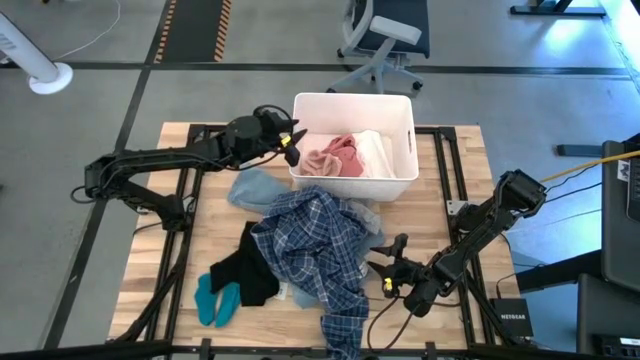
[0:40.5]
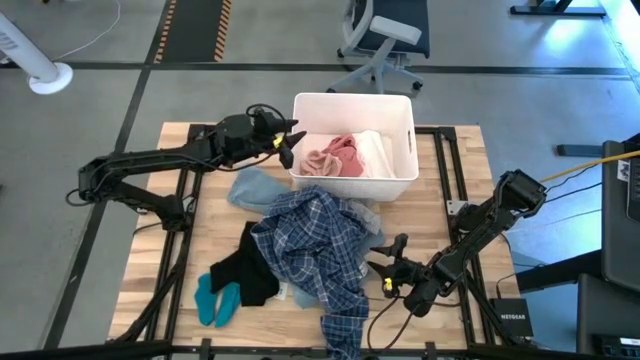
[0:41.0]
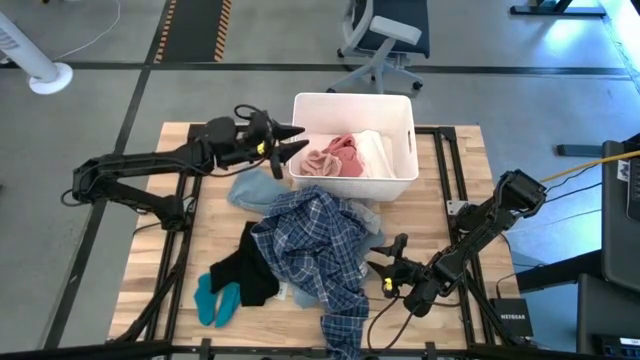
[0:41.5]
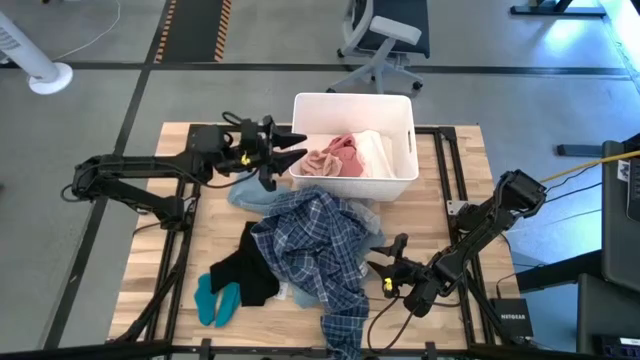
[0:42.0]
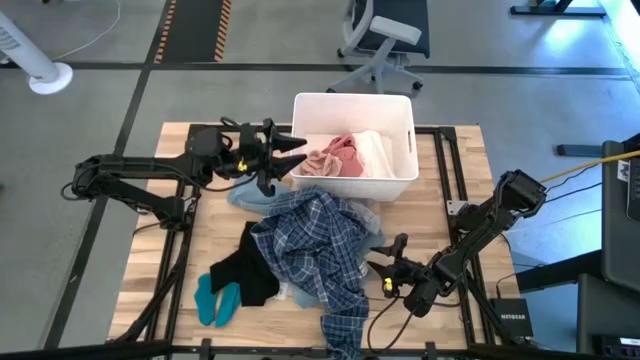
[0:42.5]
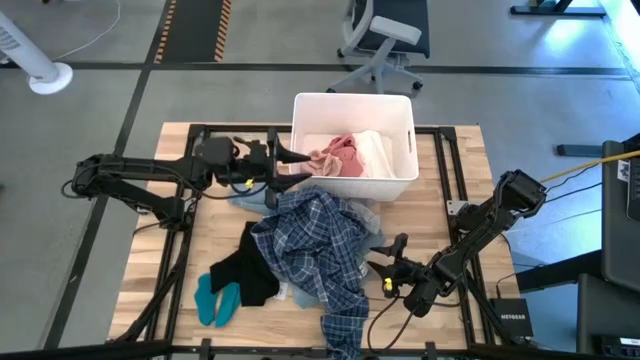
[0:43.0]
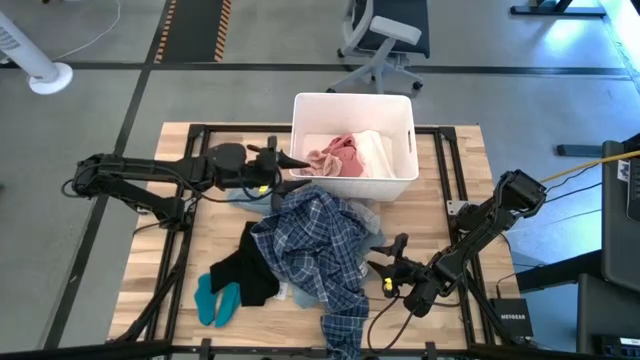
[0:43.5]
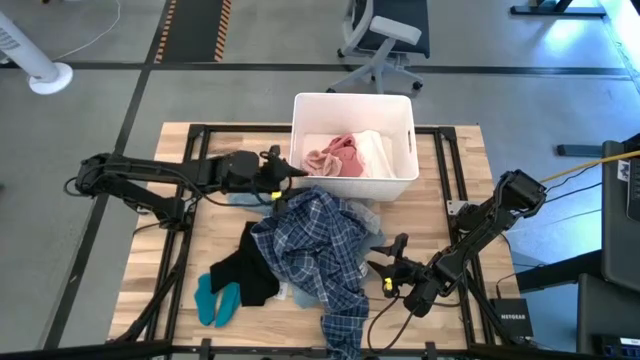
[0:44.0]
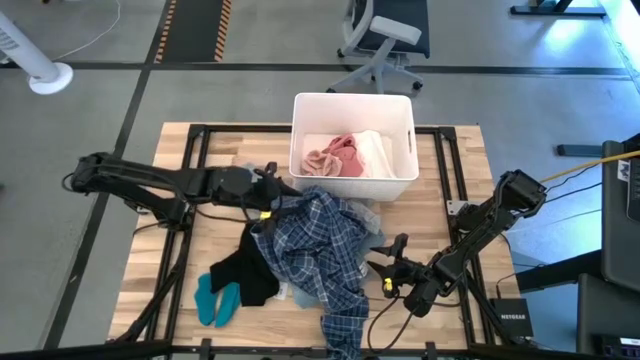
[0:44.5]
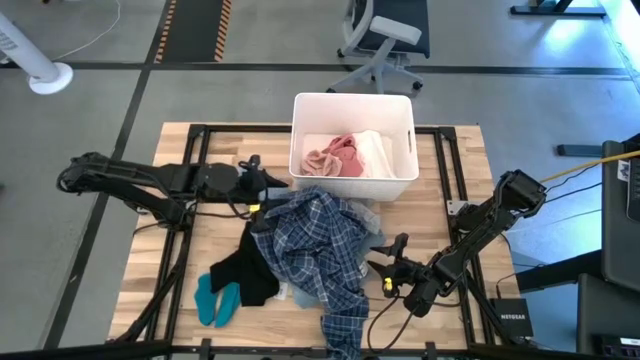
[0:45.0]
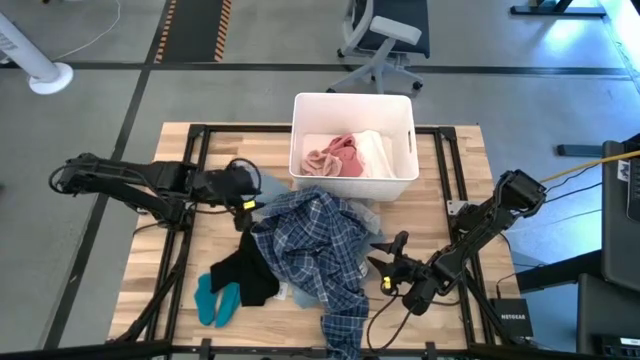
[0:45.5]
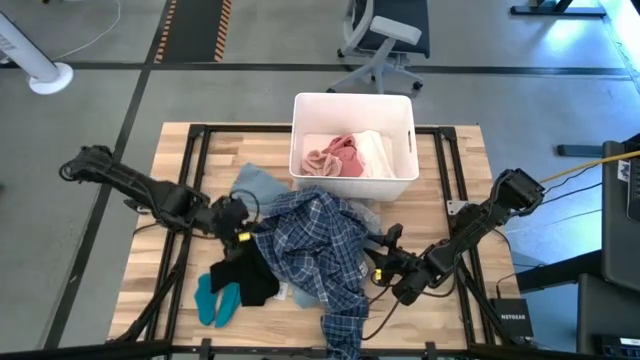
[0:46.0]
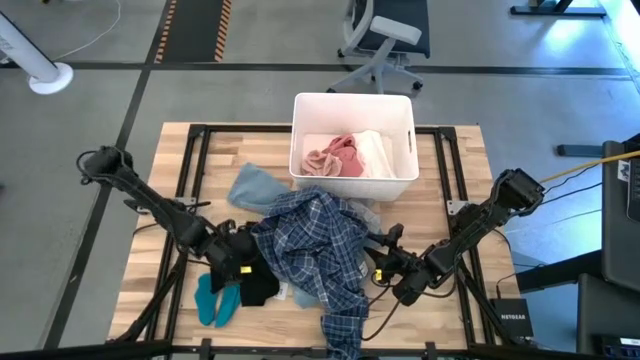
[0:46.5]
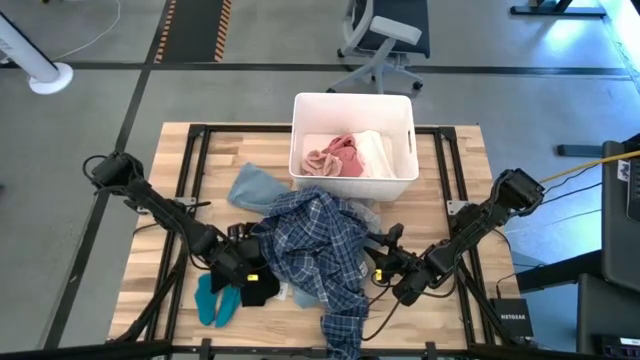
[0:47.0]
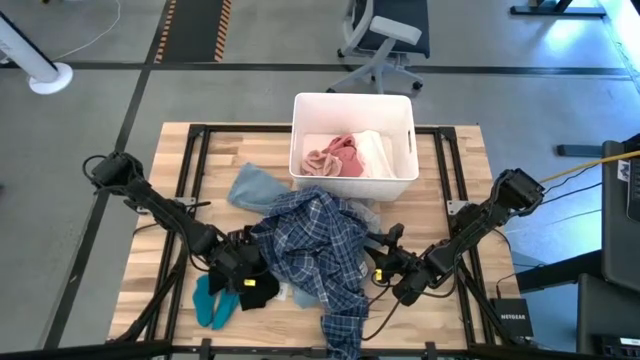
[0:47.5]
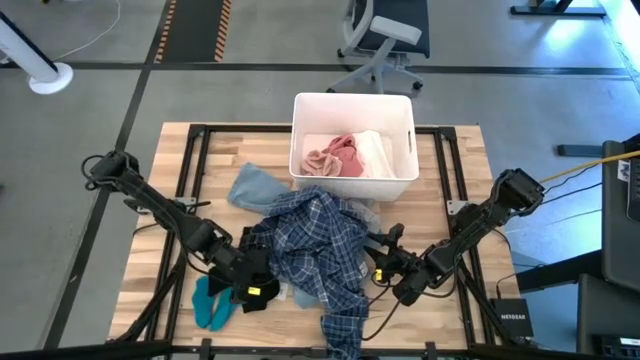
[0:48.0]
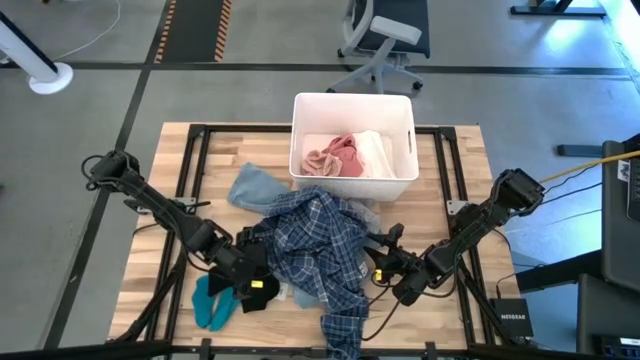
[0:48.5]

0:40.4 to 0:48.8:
Task: Sort clothes
Put the black shorts into the white laundry bin

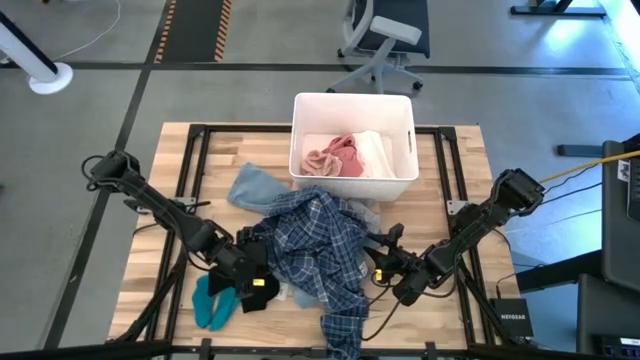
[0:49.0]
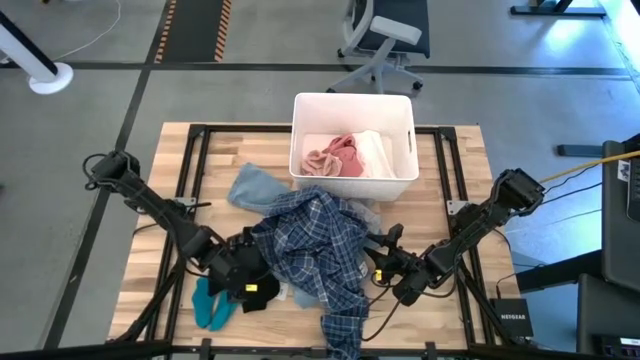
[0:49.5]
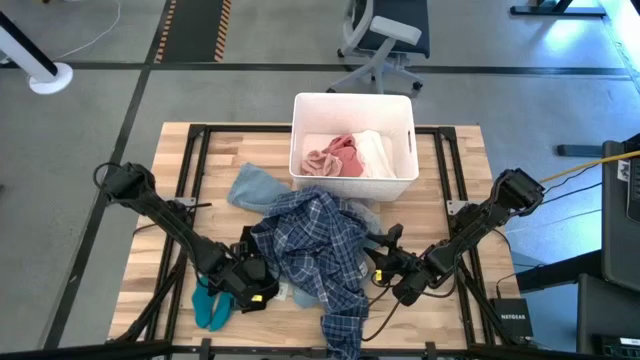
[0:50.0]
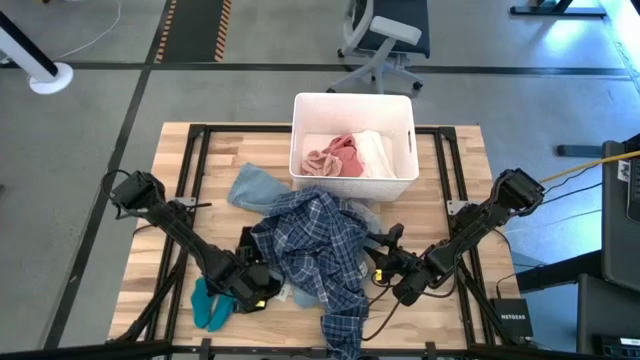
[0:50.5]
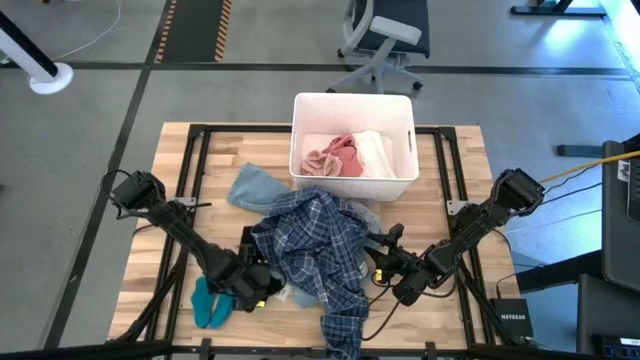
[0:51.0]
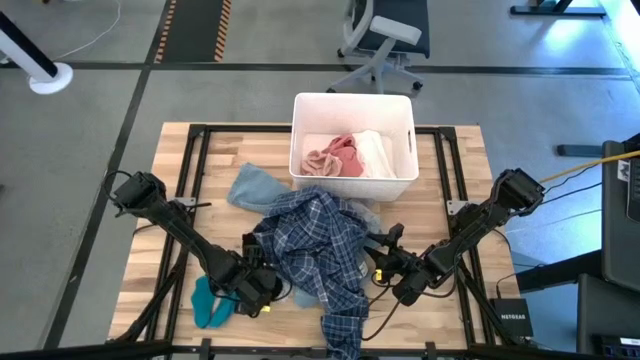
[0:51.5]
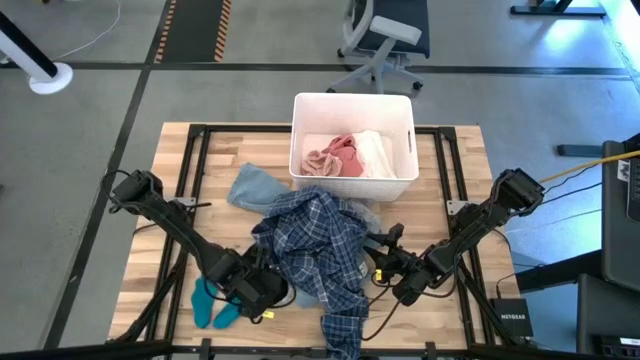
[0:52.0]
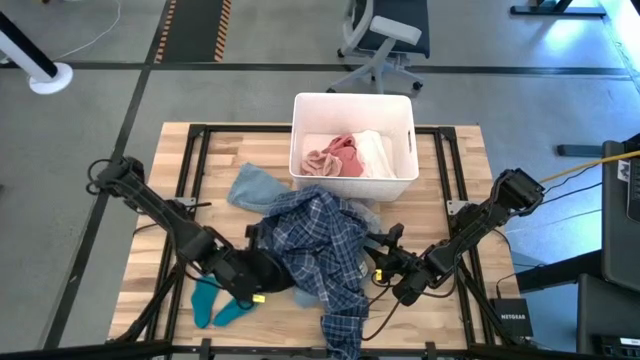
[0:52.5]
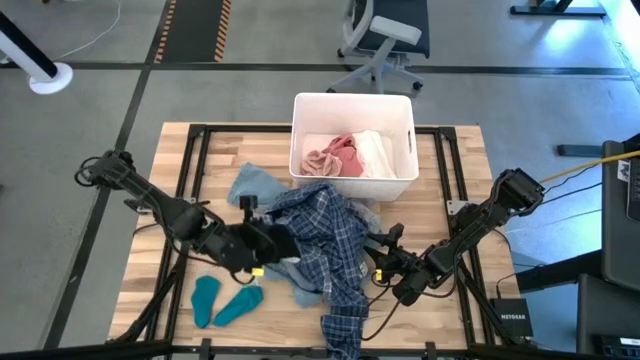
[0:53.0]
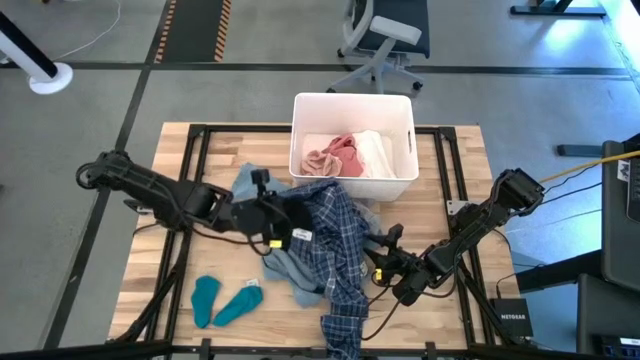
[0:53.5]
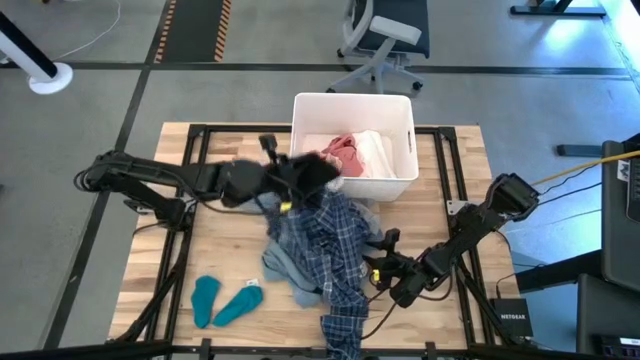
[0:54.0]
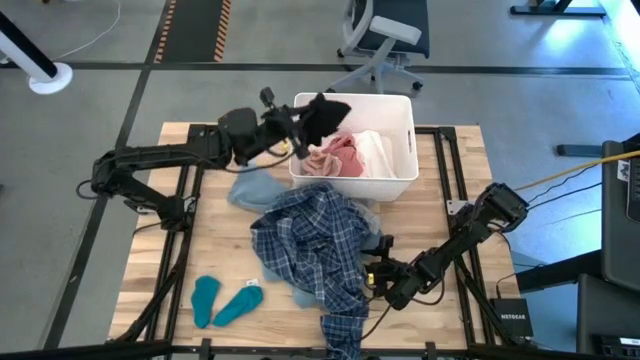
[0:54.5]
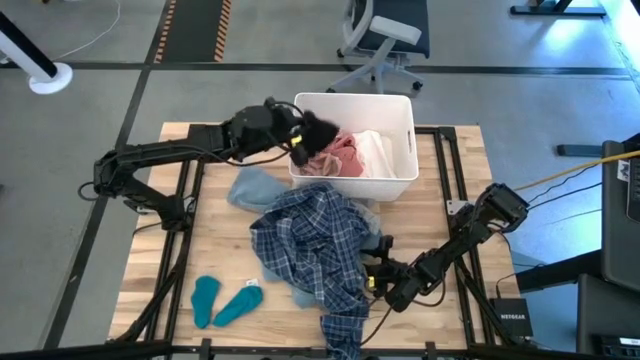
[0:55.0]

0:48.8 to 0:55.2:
Put the black shorts into the white laundry bin

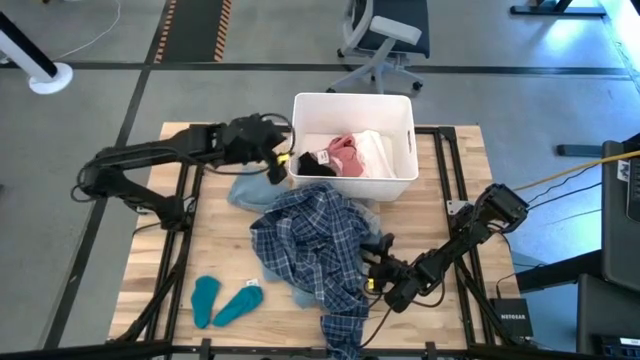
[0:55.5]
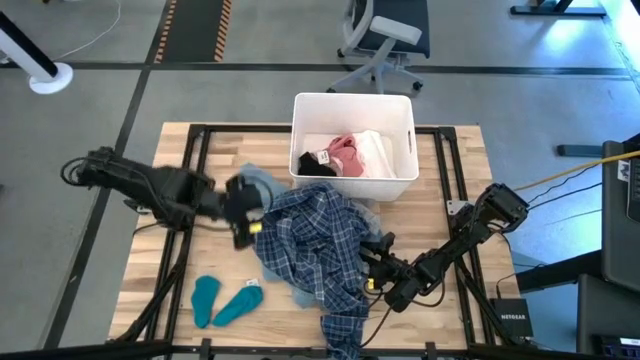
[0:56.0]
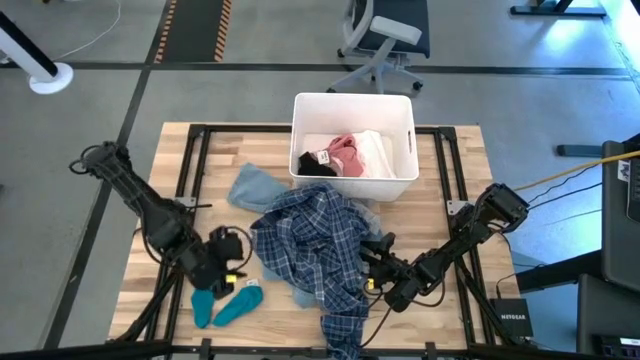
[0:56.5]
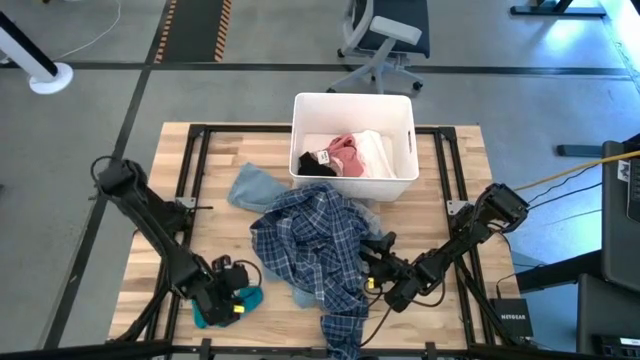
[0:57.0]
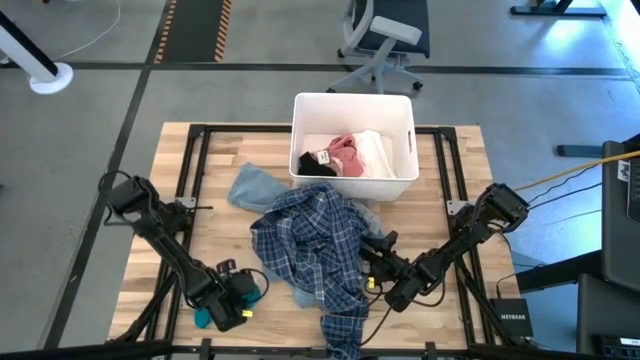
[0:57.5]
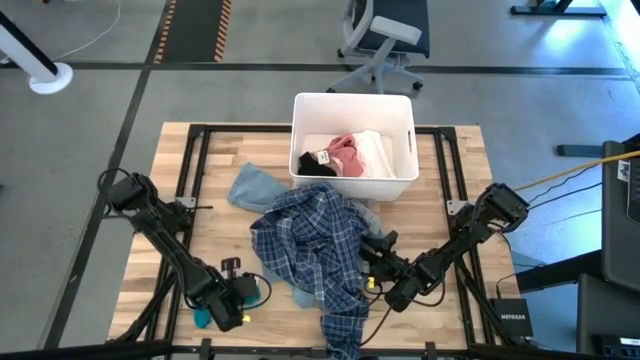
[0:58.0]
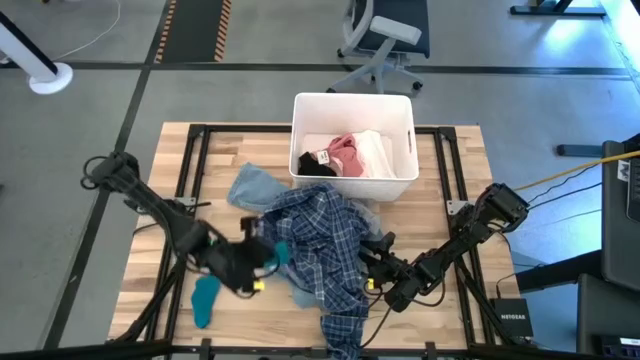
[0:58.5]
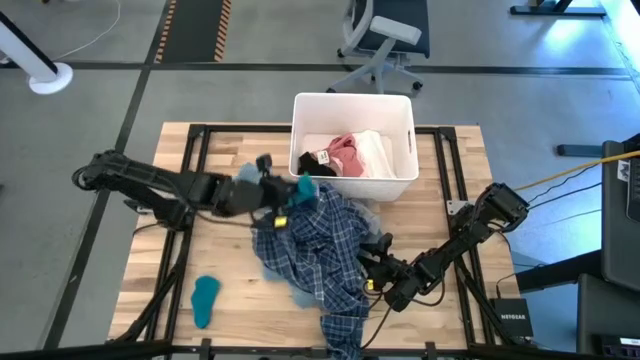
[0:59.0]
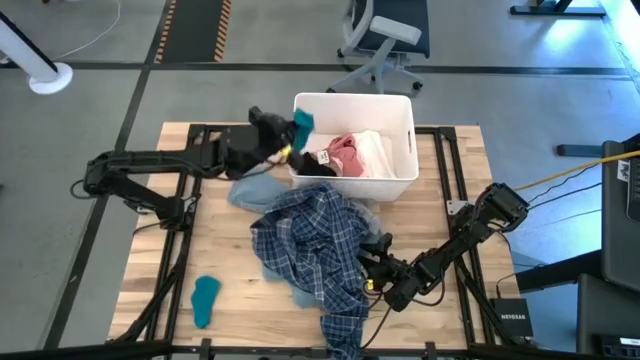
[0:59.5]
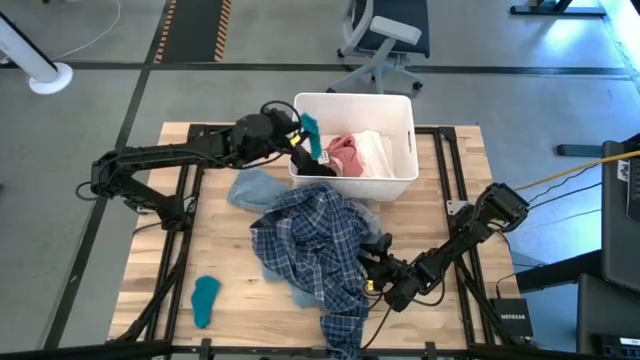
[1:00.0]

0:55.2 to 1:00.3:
Put the blue sock into the white laundry bin

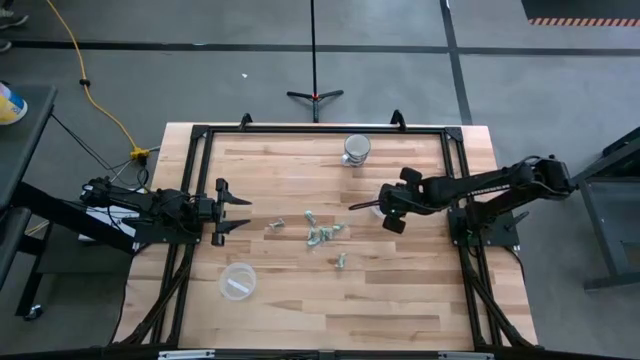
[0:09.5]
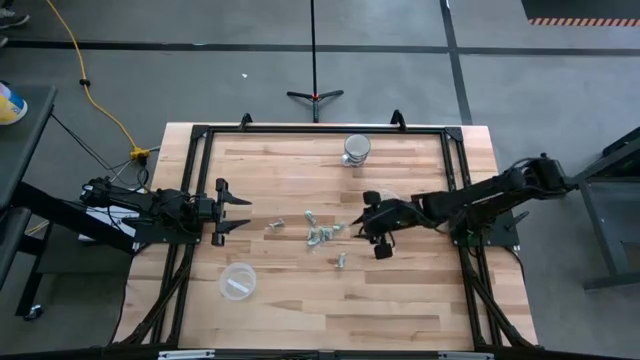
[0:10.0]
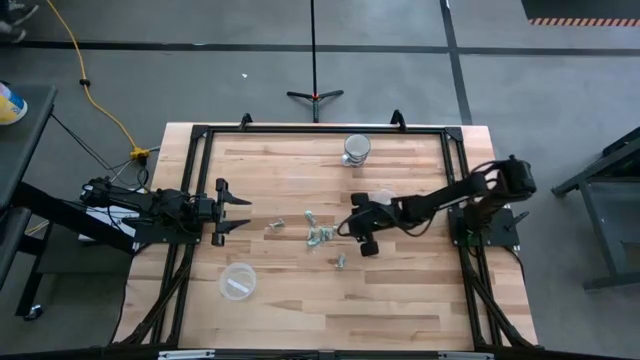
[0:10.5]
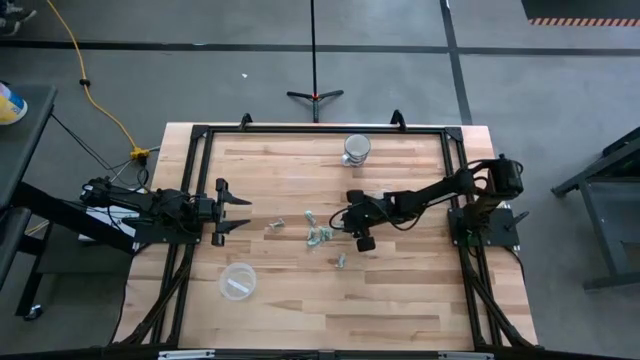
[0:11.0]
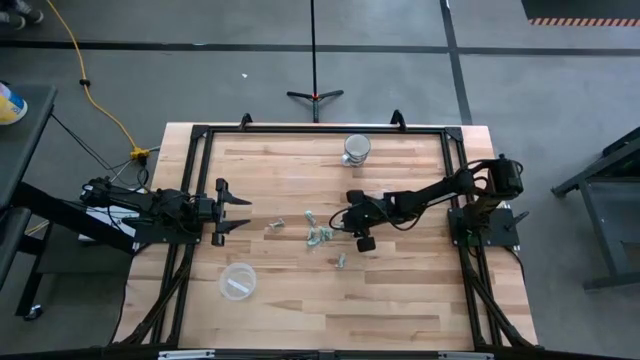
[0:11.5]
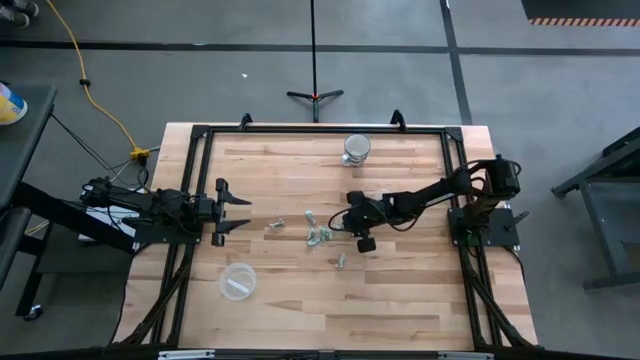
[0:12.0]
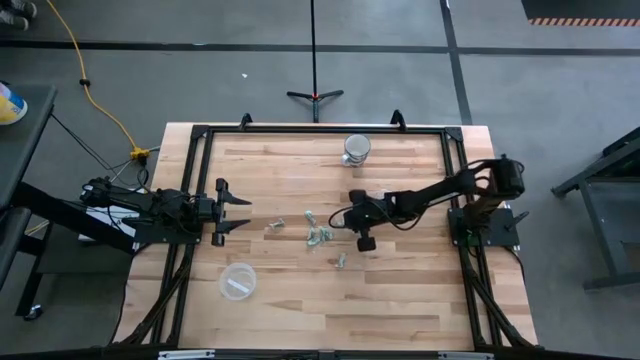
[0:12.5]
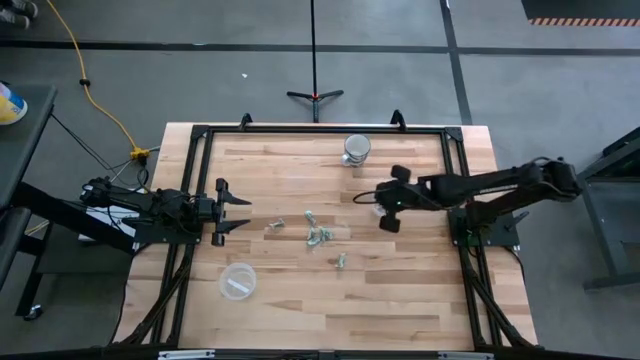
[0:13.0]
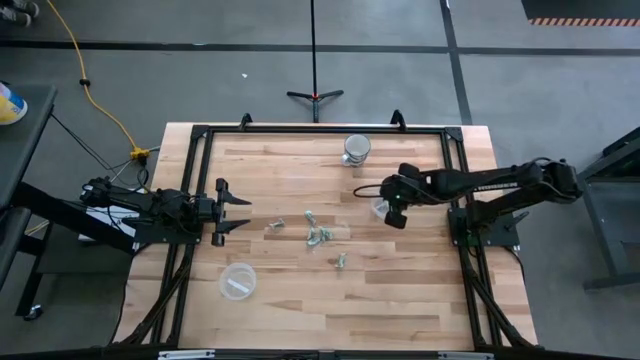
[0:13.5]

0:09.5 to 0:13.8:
Task: Pick and place Stevia / Truvia into bins
Put the stevia packet into the square transparent container
